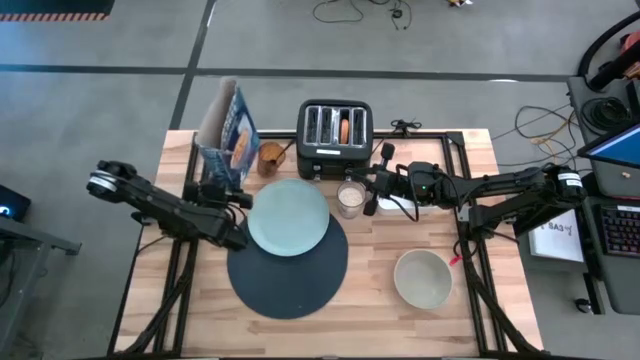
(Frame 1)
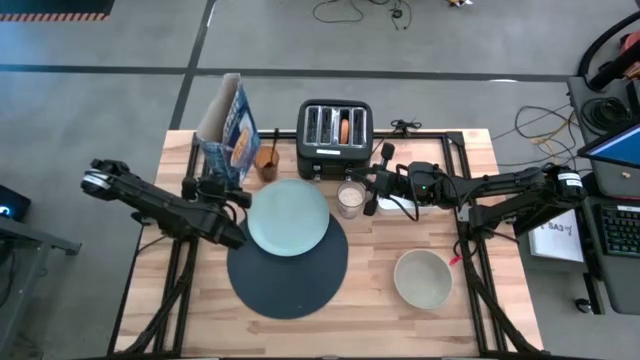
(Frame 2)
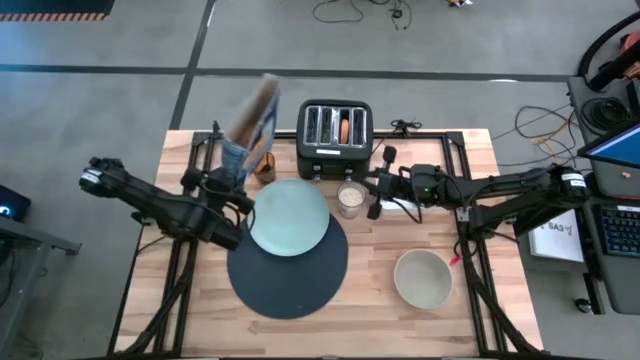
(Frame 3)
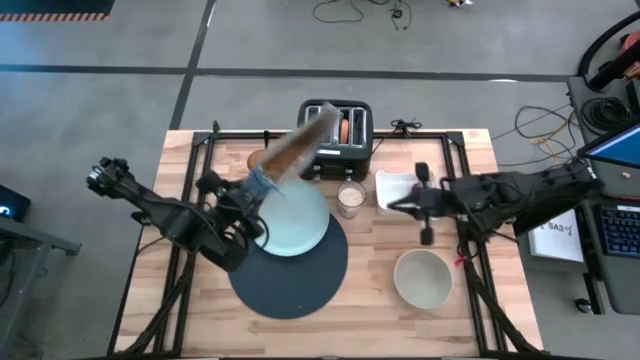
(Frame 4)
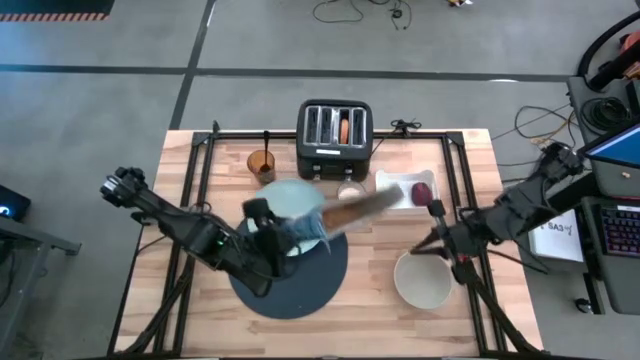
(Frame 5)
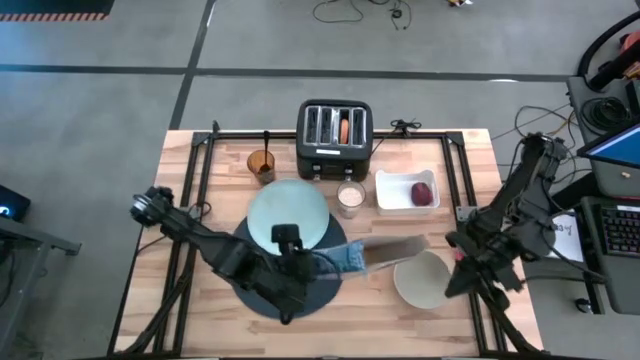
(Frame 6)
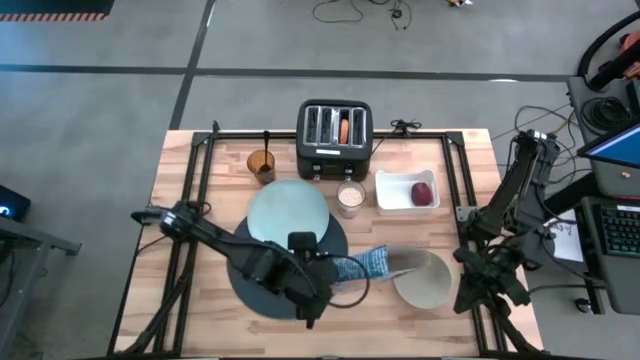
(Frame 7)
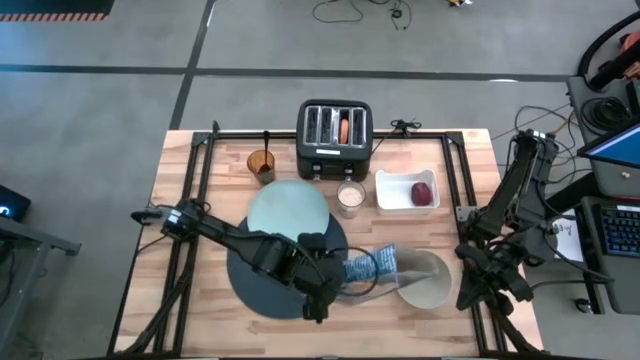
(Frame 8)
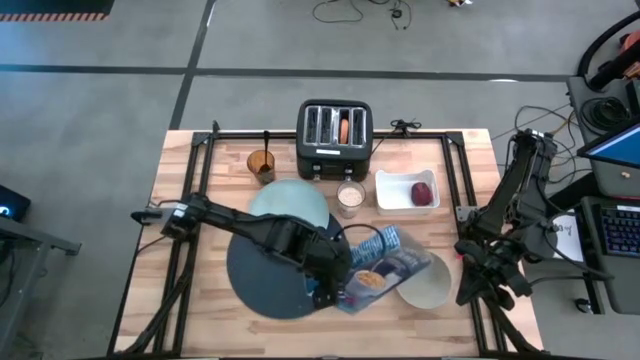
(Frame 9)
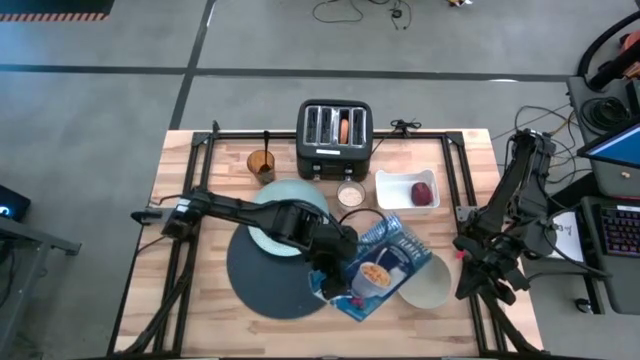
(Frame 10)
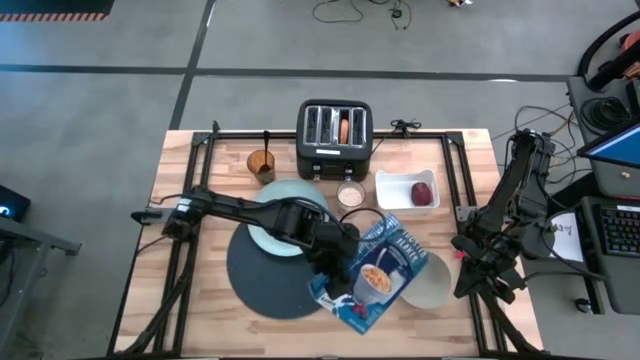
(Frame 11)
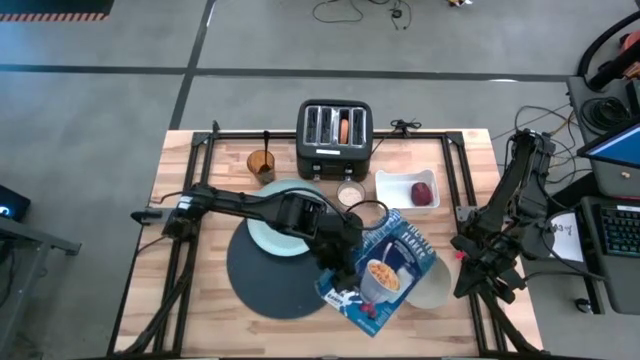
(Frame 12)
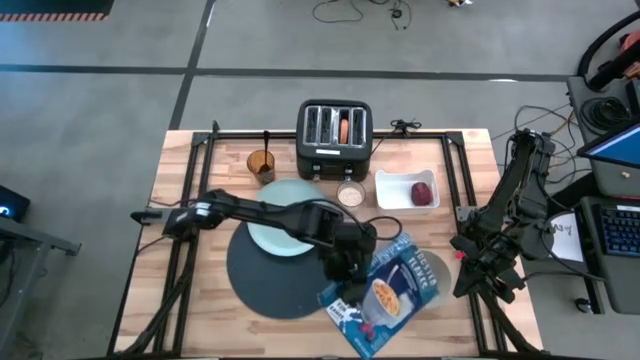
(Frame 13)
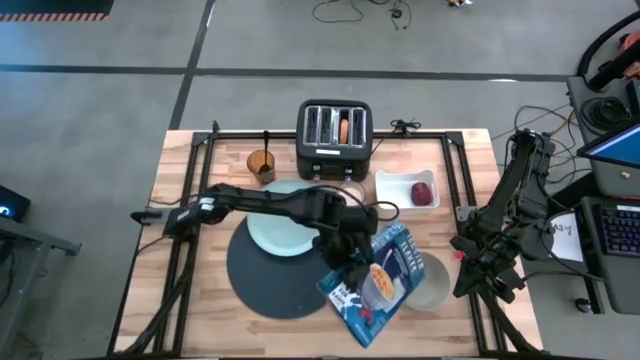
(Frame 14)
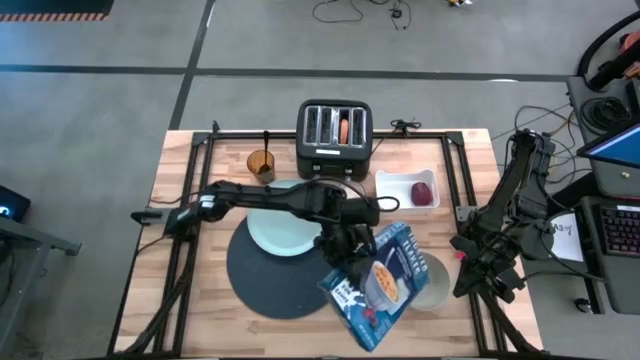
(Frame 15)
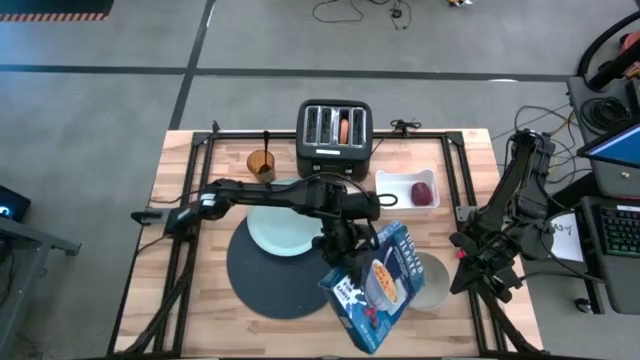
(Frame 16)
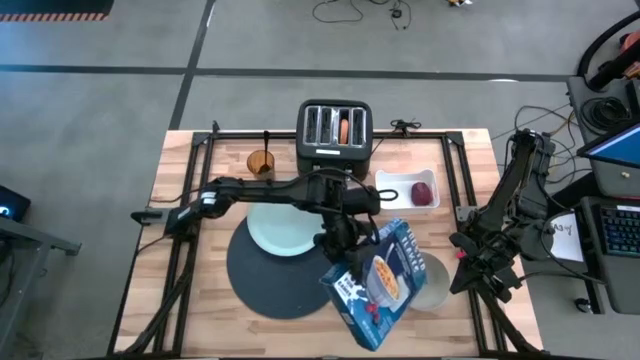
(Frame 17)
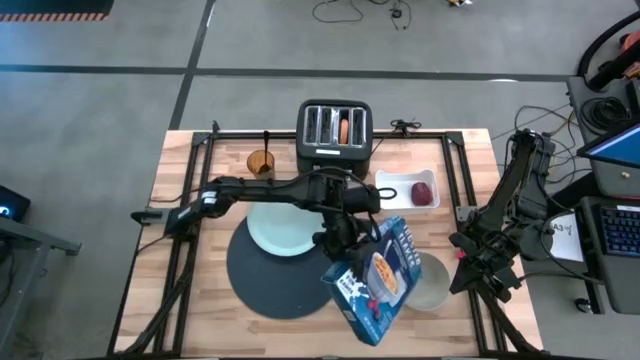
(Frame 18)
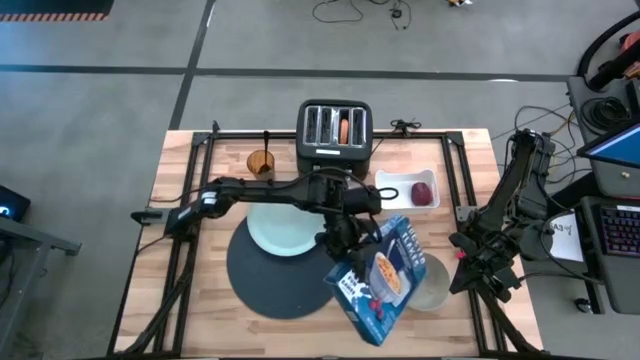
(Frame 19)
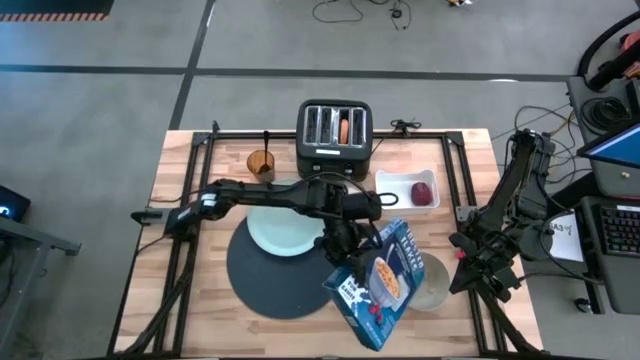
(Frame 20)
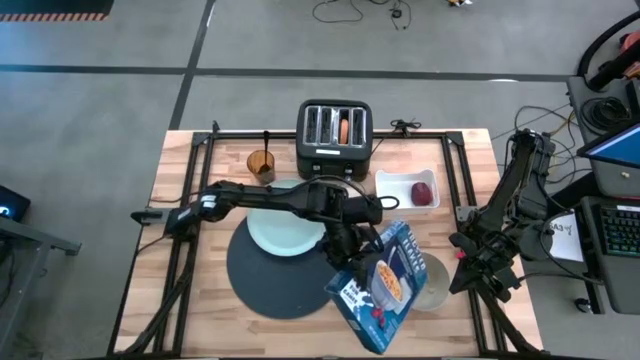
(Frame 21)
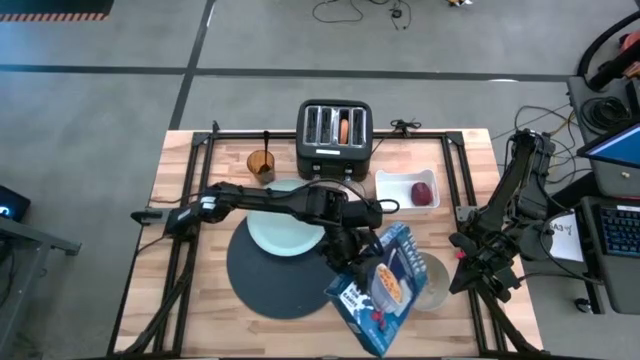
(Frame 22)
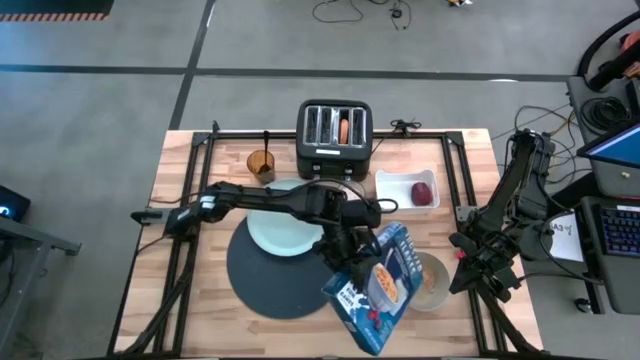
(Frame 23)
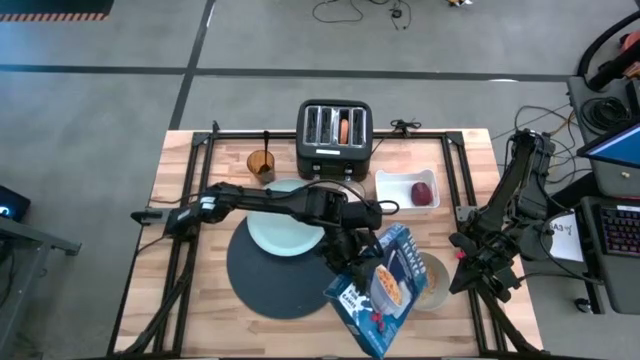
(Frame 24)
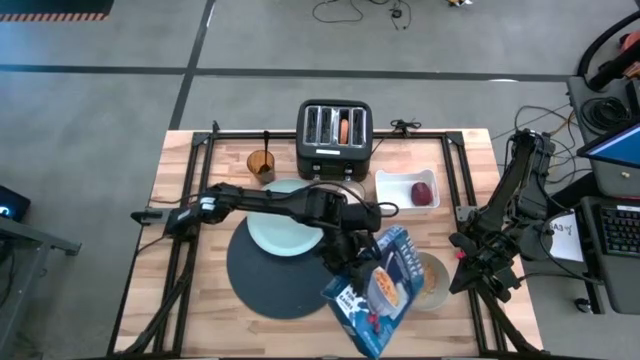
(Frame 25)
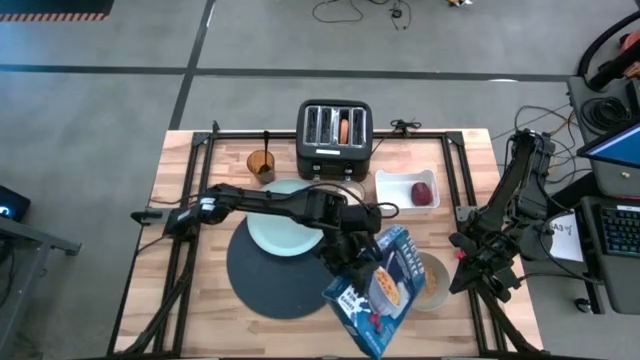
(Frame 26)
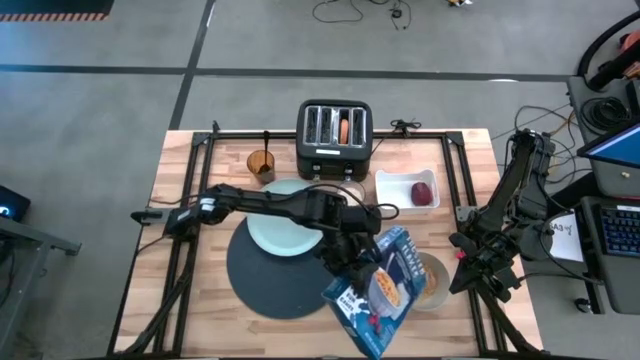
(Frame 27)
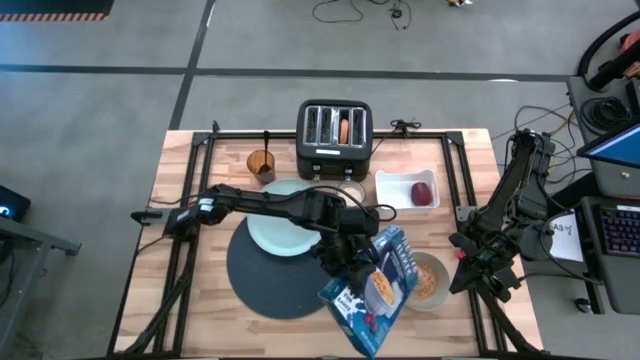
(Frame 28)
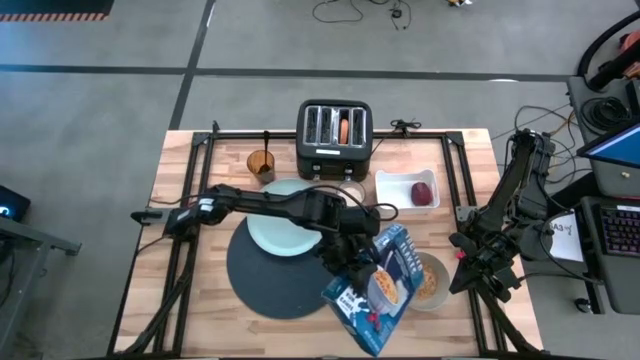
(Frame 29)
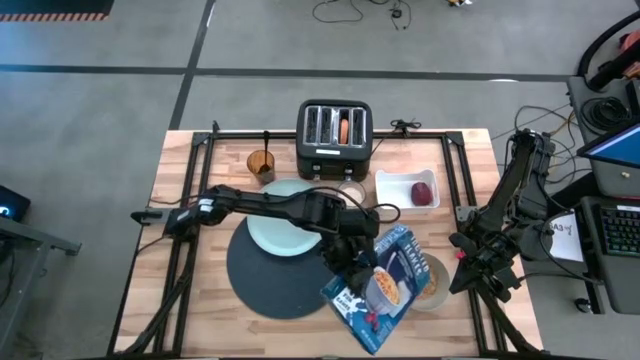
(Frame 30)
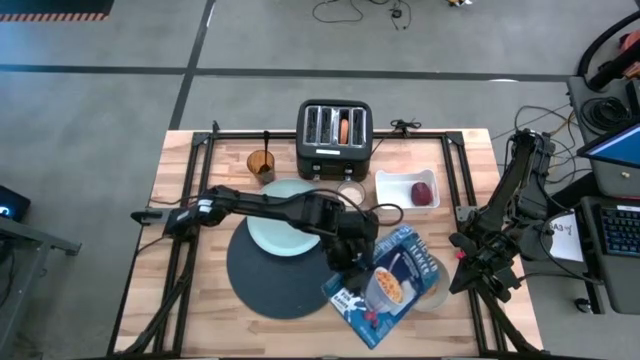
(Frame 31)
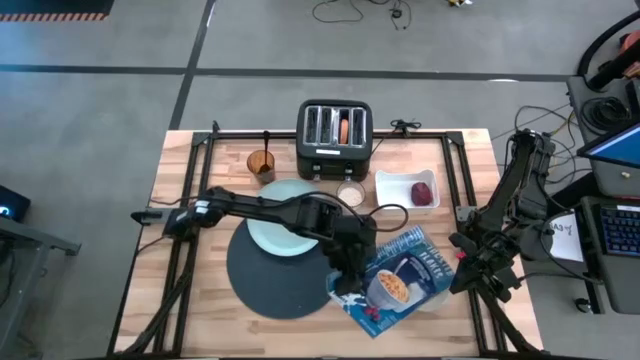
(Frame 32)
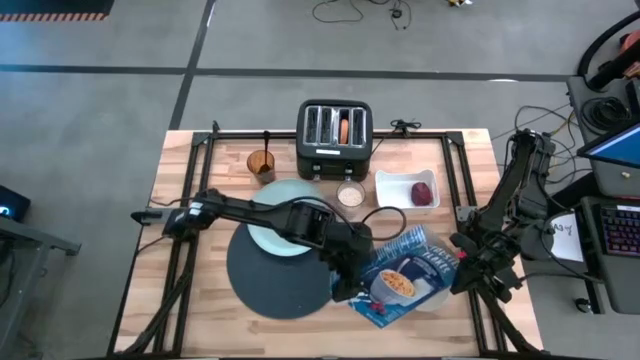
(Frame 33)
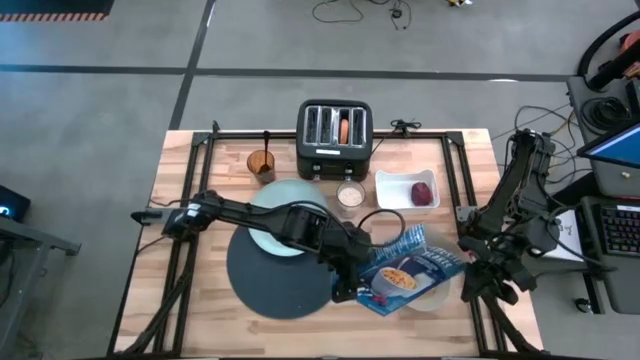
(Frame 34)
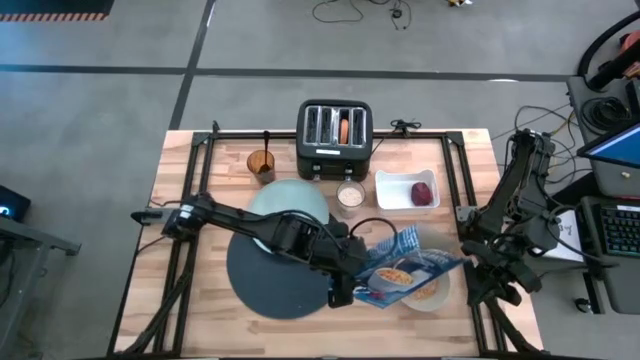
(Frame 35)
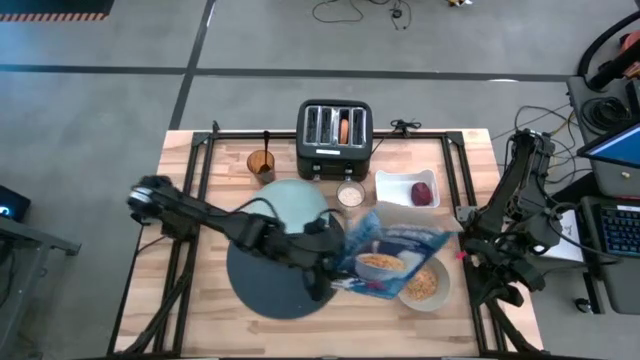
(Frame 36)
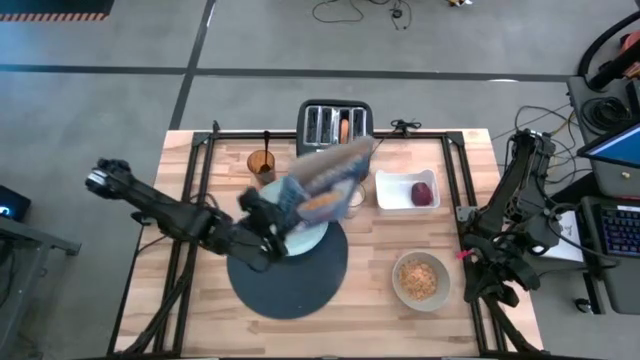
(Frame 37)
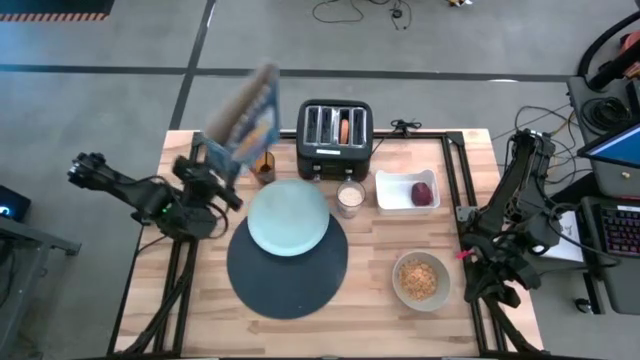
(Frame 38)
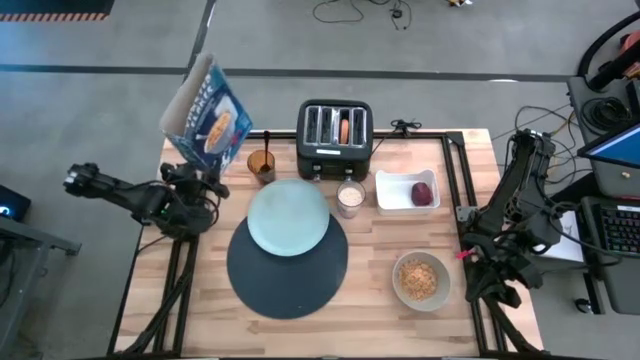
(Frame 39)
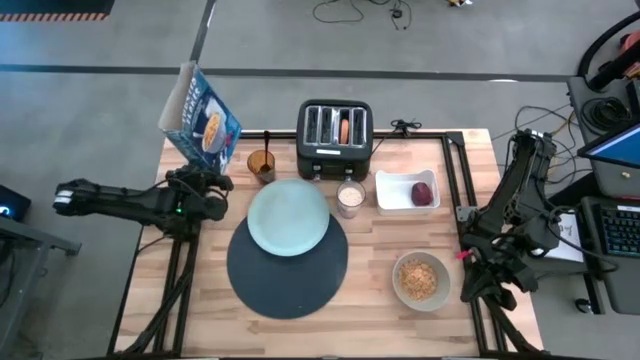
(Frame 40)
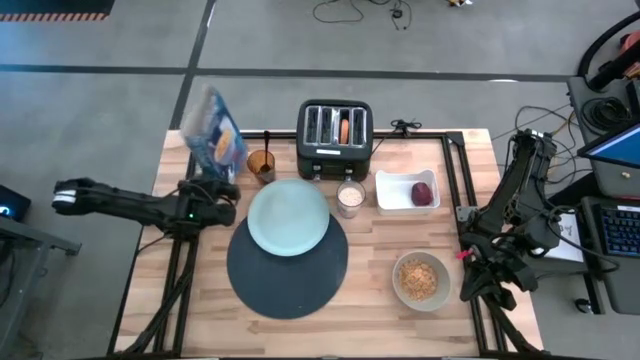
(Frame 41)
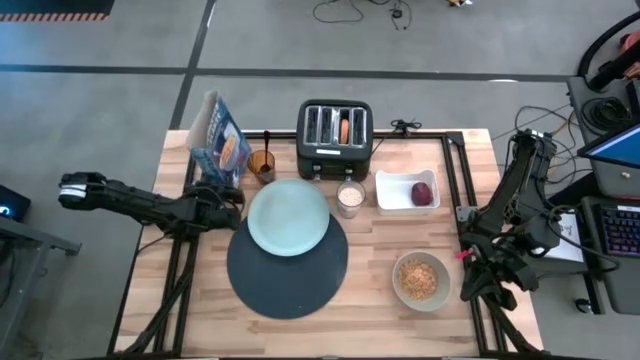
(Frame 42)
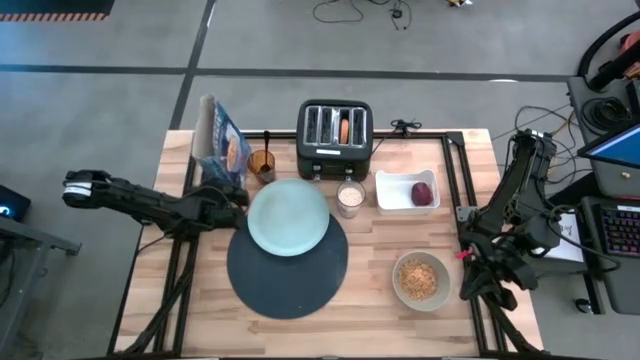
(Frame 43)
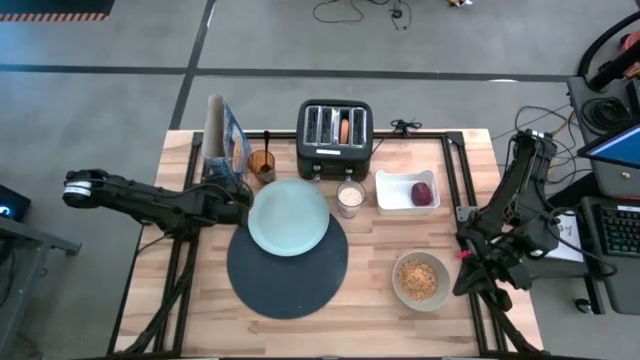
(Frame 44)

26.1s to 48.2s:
Task: Arrange a breakfast setting
Pour the cereal from the blue cereal box into the gray bowl
